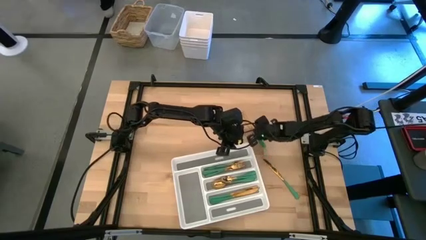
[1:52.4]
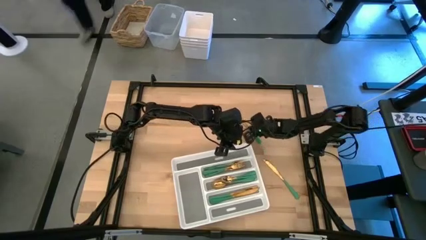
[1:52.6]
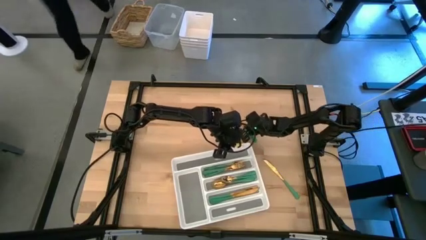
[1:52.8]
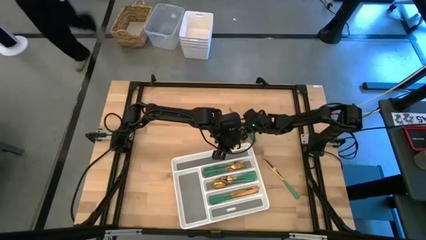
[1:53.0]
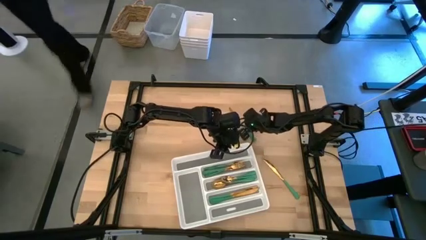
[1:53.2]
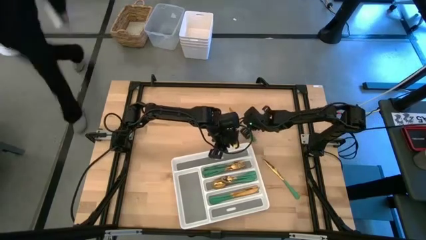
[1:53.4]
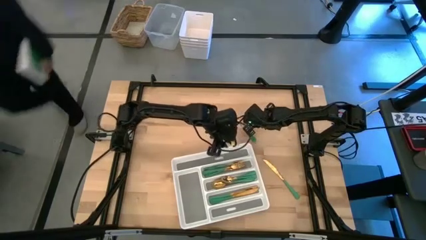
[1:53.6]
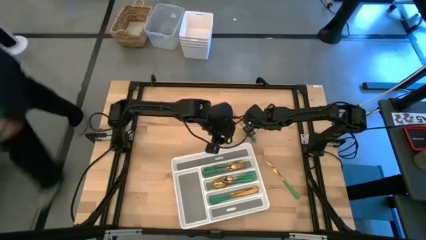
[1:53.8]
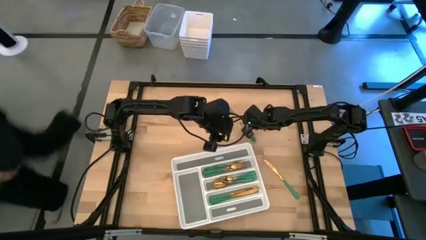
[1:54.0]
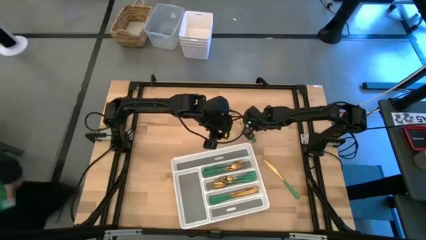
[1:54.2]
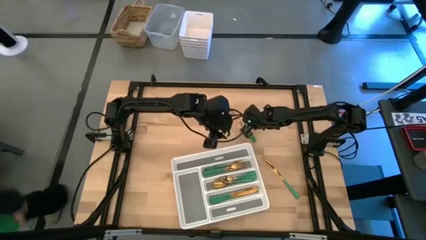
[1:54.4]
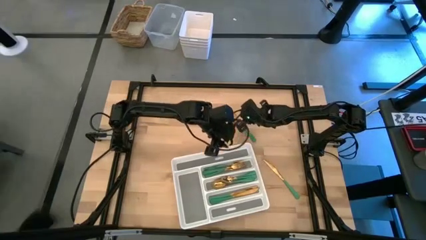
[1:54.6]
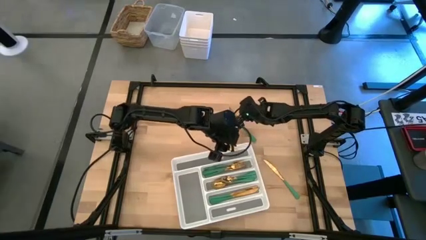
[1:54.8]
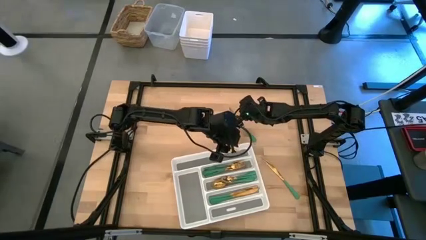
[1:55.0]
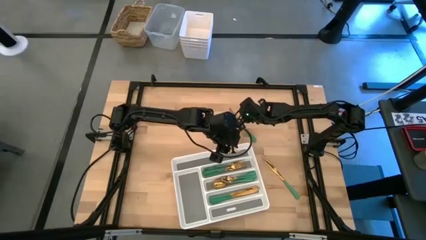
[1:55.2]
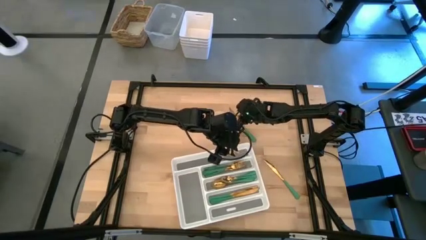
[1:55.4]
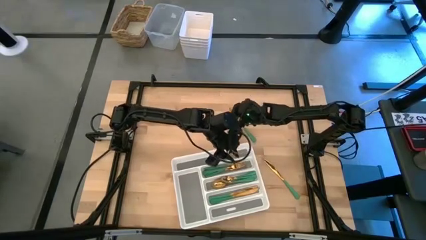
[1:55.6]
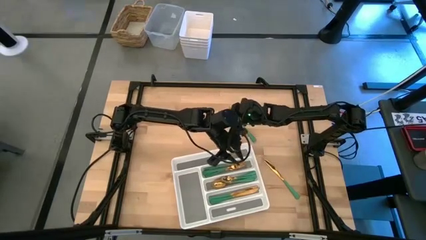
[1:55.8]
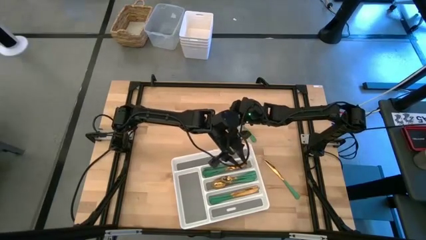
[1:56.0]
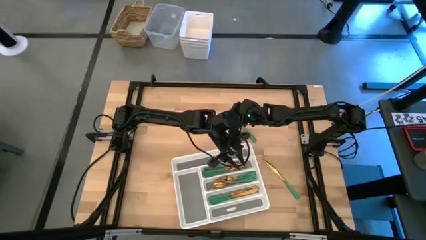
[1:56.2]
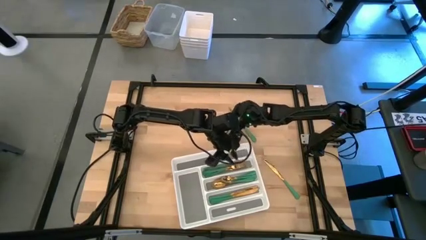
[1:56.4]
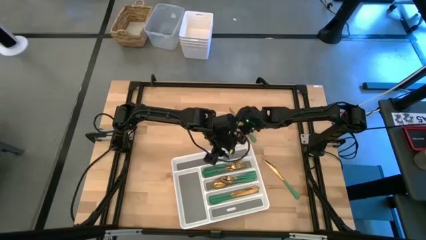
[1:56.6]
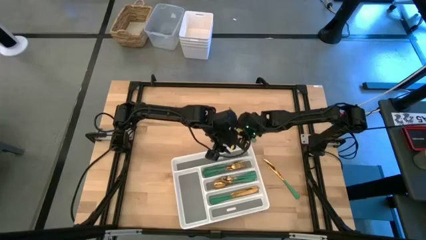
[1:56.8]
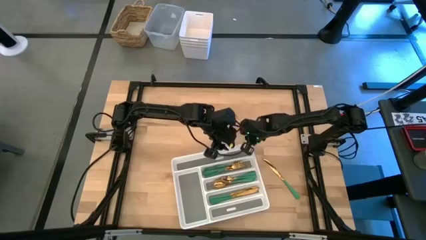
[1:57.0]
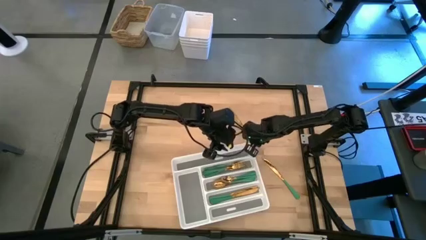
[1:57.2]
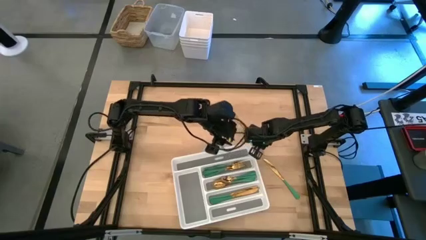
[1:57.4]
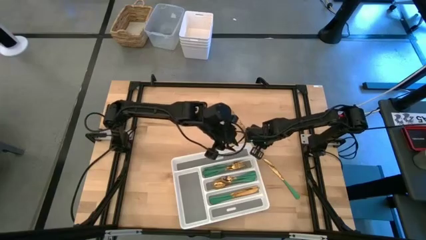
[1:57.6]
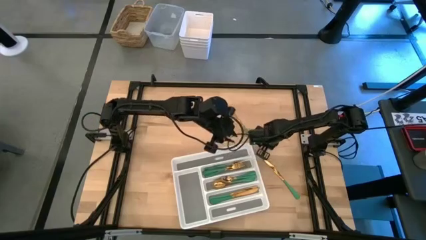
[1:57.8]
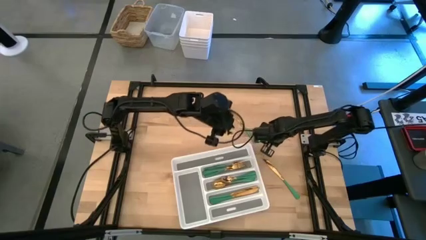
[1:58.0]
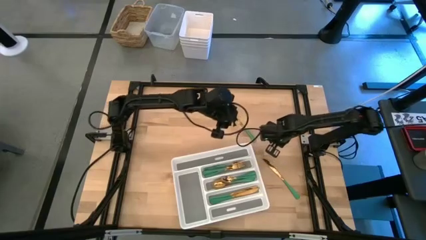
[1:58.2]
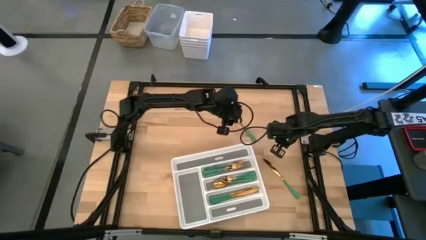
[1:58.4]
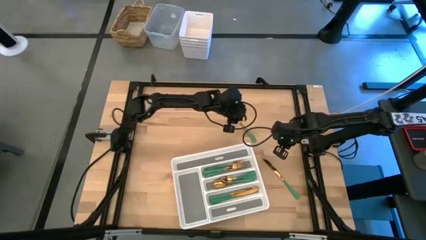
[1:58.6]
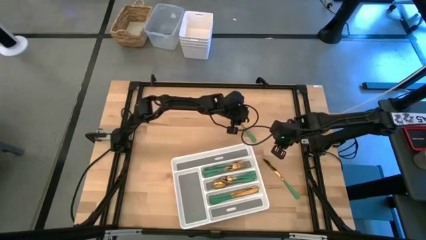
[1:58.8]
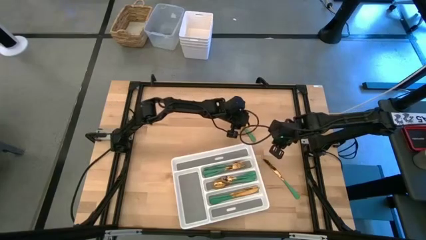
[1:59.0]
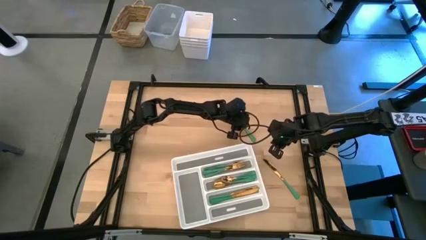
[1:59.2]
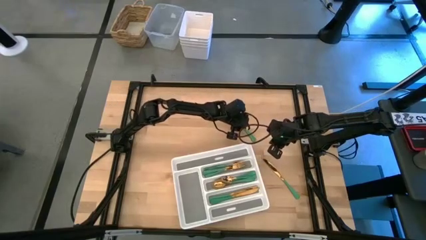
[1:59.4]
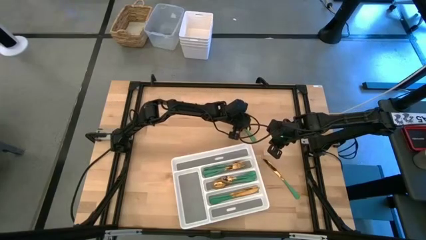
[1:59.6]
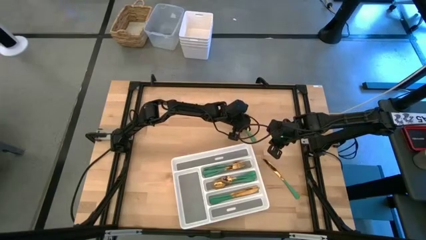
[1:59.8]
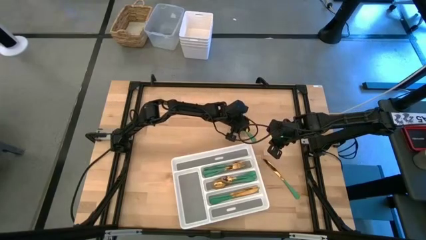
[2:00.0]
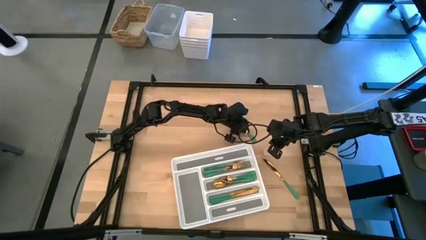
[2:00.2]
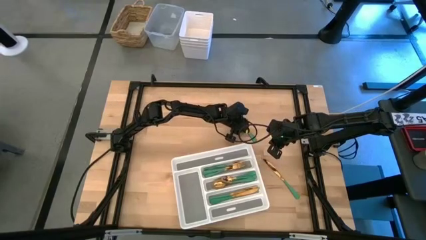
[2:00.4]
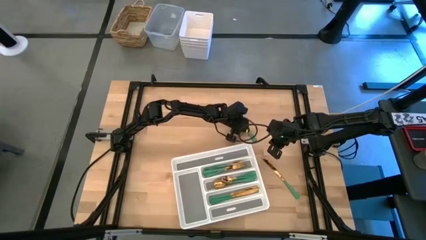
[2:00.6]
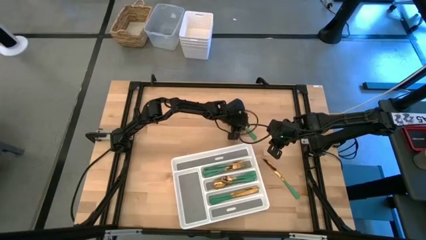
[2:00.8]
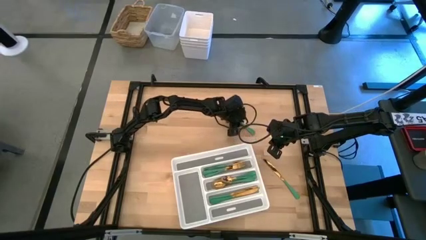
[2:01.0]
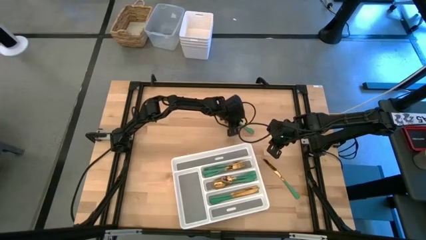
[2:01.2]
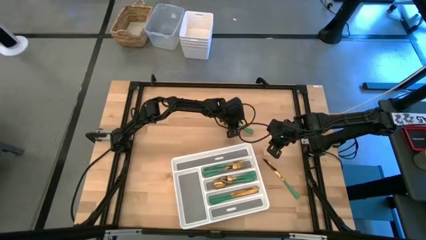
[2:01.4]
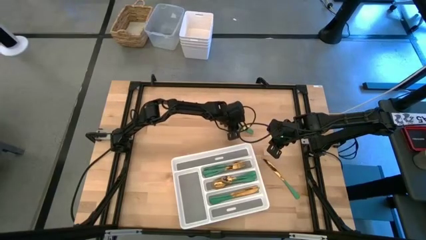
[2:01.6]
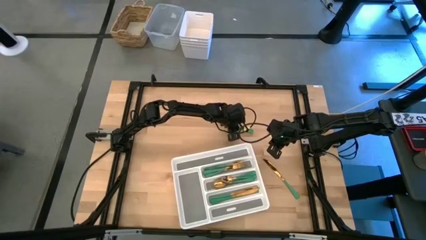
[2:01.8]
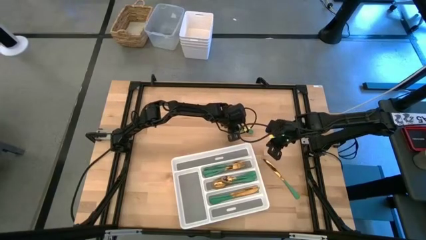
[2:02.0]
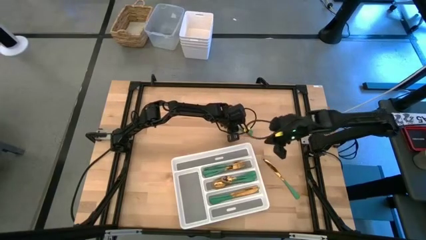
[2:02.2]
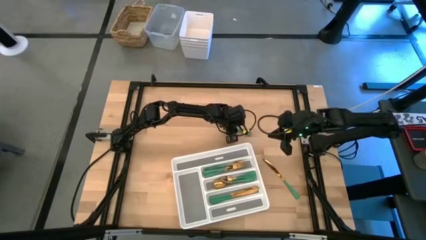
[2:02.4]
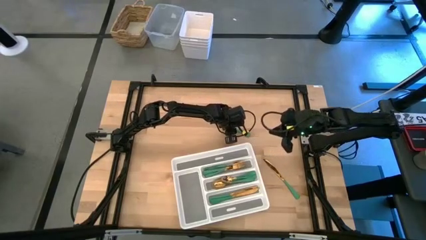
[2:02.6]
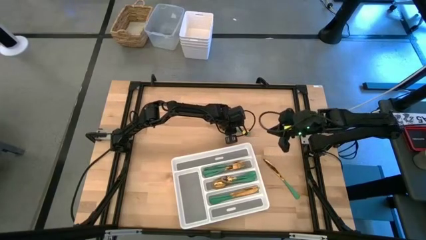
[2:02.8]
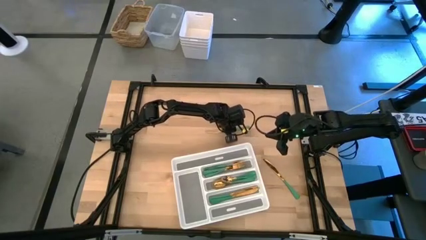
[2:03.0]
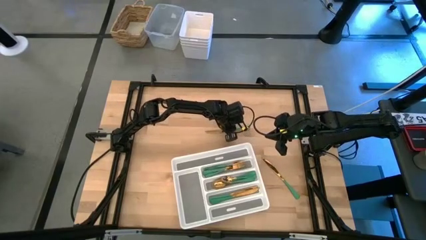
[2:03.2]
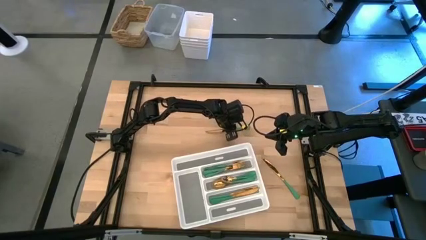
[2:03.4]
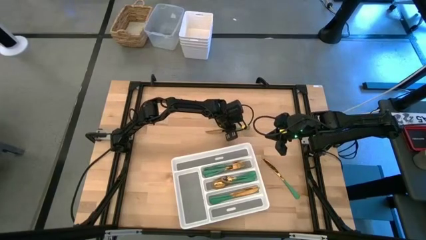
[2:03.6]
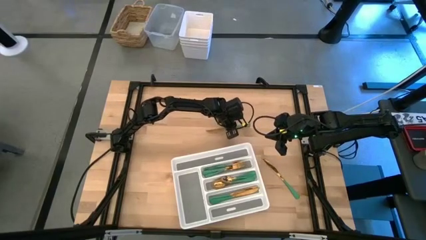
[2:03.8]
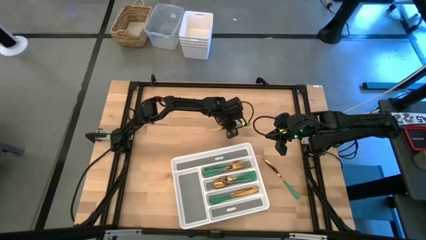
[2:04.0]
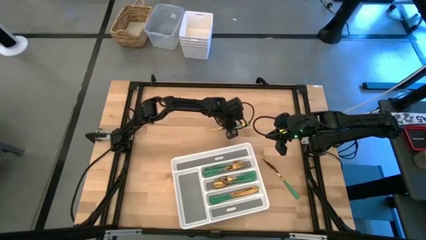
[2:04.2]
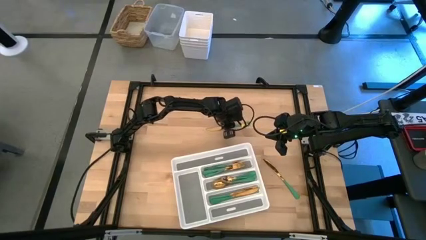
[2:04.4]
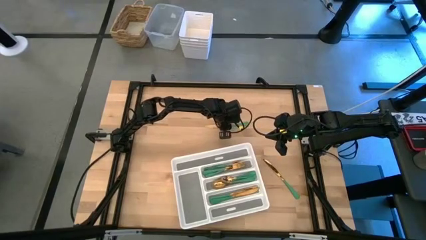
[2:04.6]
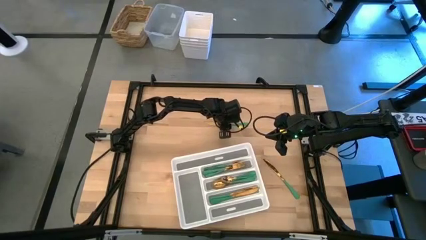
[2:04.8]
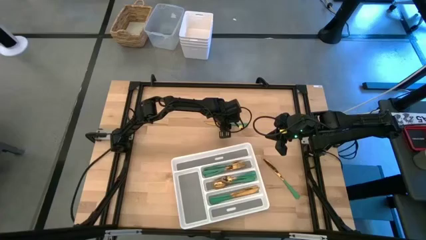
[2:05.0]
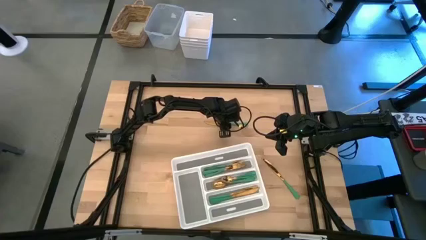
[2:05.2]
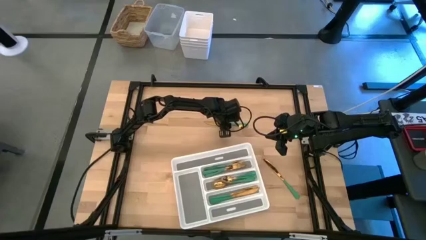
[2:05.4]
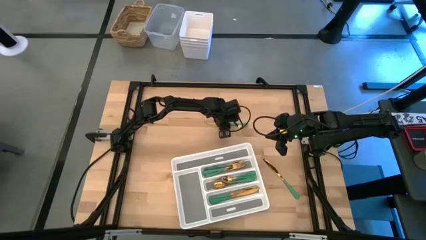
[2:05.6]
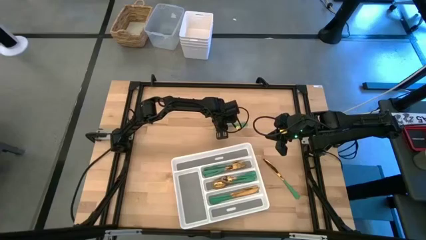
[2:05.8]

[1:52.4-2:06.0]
Task: Sort silverware
Put the green knife into the white silverware tray

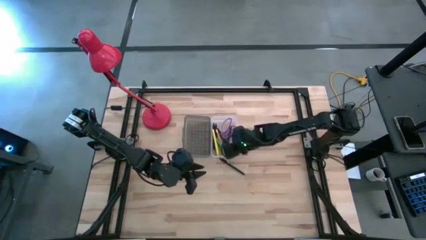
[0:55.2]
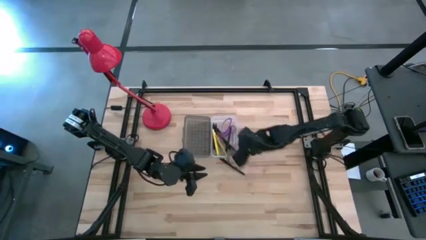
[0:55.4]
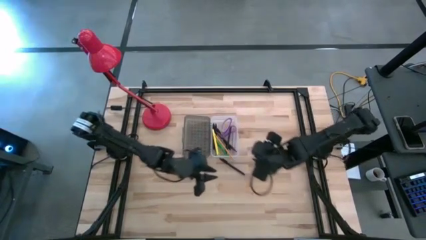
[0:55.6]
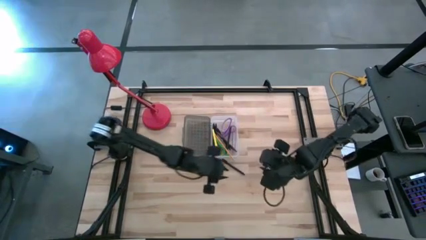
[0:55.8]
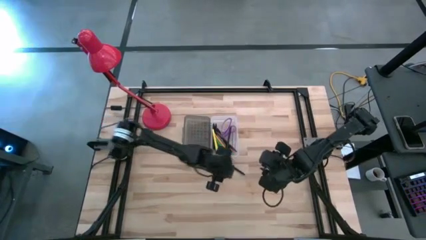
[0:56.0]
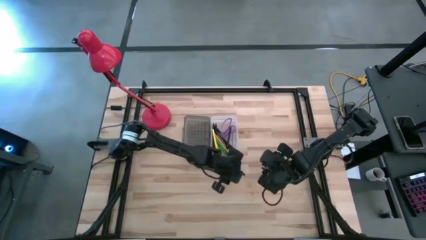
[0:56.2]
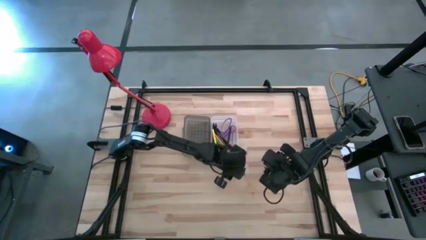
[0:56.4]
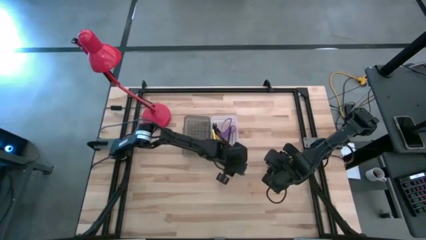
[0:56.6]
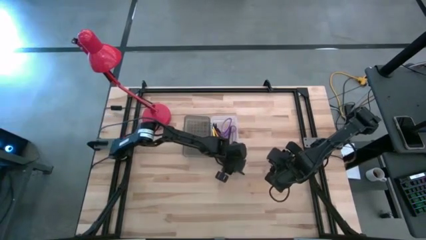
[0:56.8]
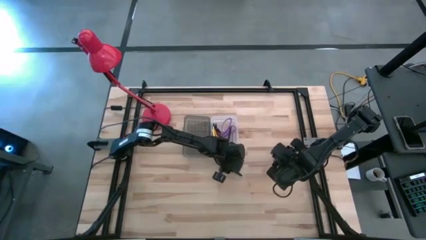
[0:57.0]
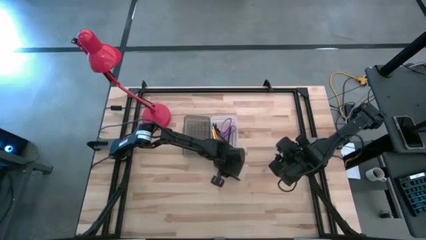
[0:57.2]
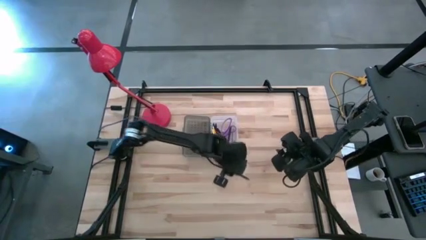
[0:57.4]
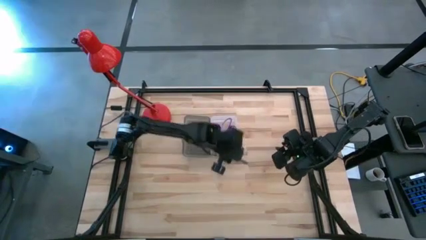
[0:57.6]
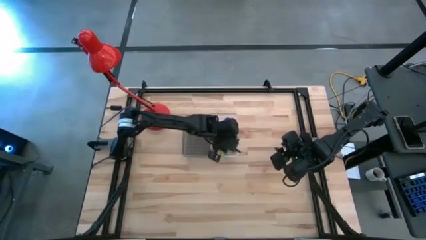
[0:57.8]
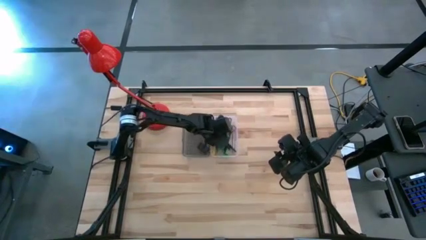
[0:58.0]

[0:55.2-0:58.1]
Task: Pick & place school supplies into a supply box
Put the black pen into the supply box
